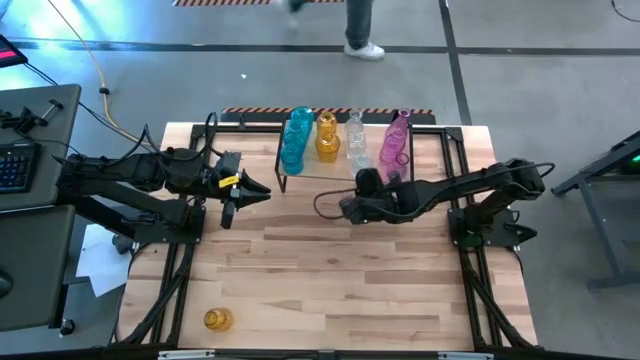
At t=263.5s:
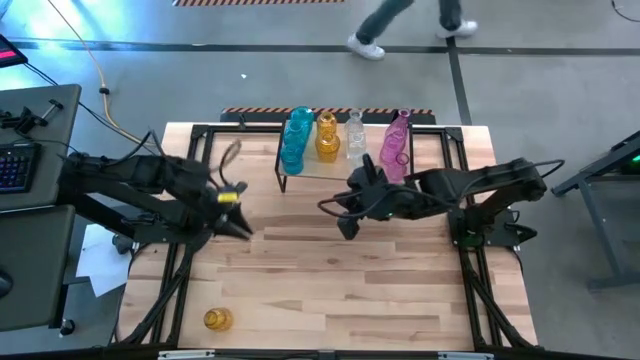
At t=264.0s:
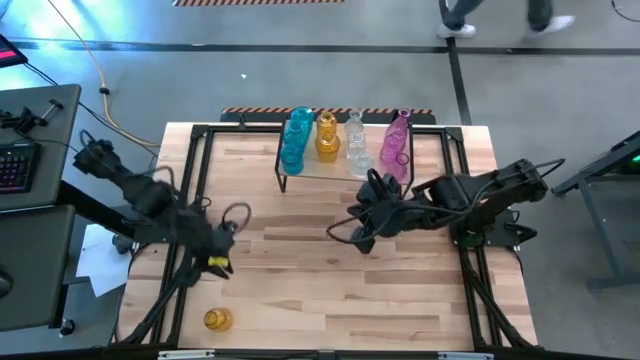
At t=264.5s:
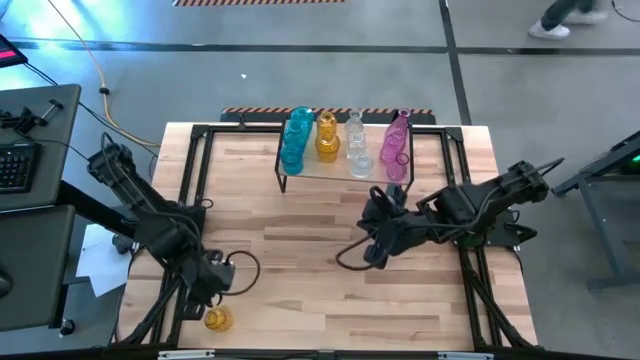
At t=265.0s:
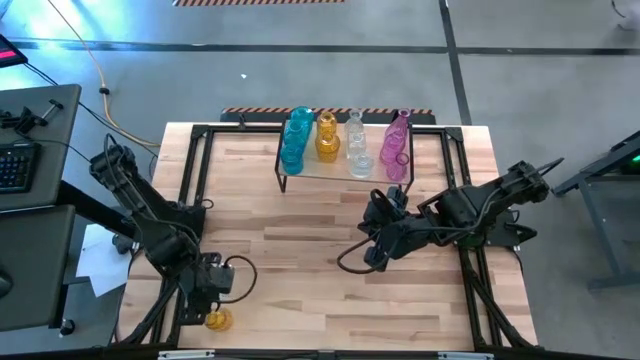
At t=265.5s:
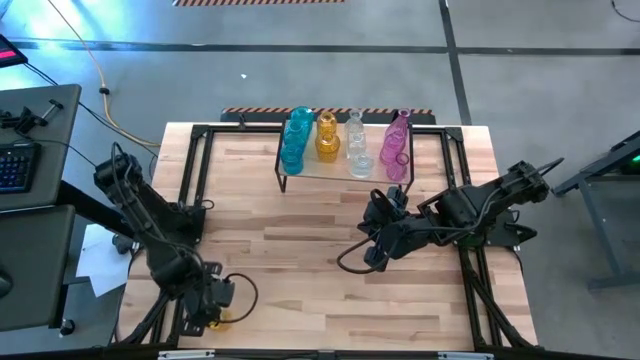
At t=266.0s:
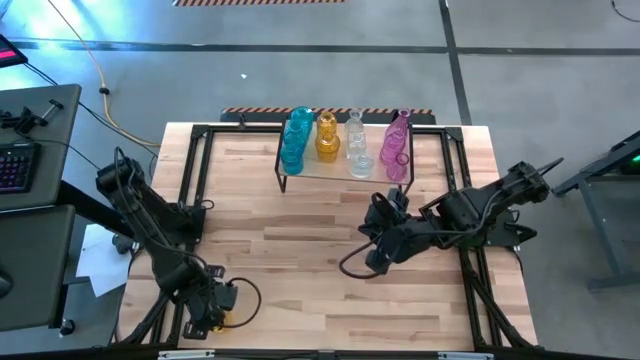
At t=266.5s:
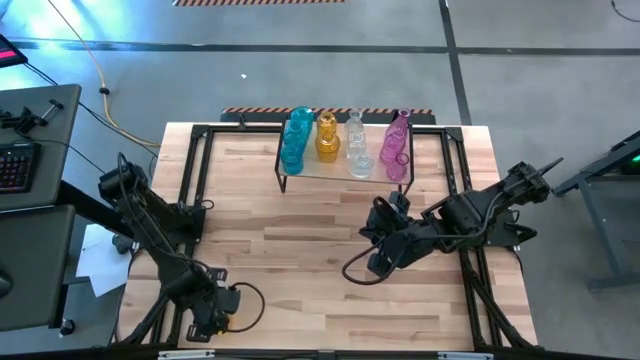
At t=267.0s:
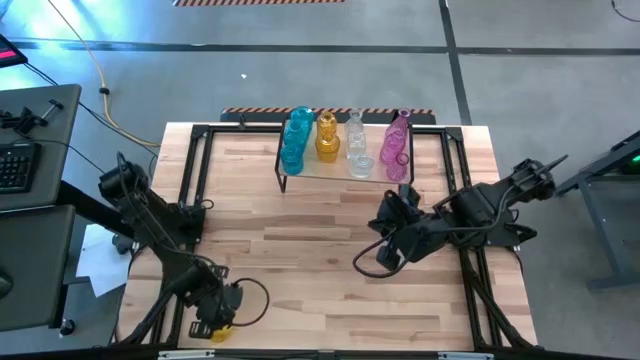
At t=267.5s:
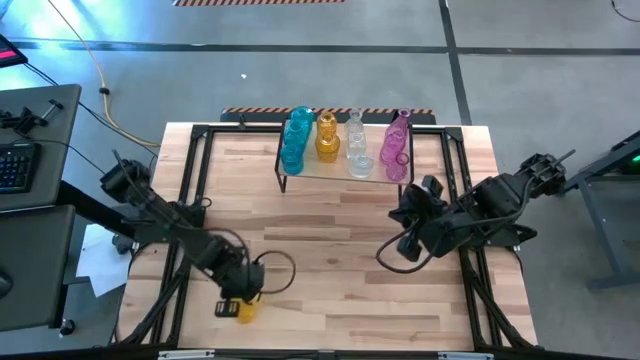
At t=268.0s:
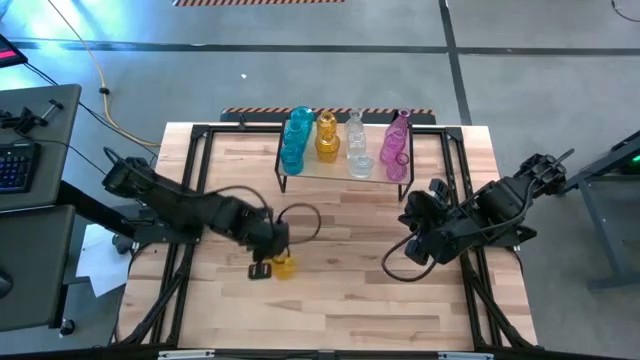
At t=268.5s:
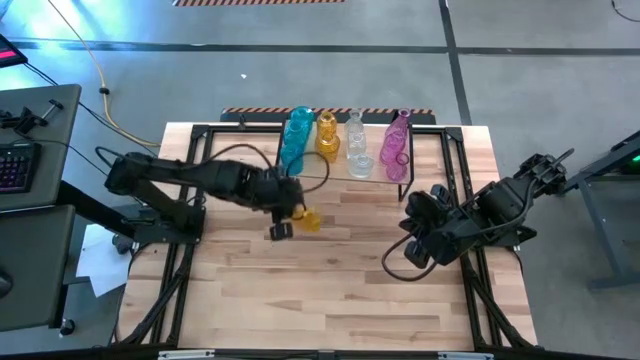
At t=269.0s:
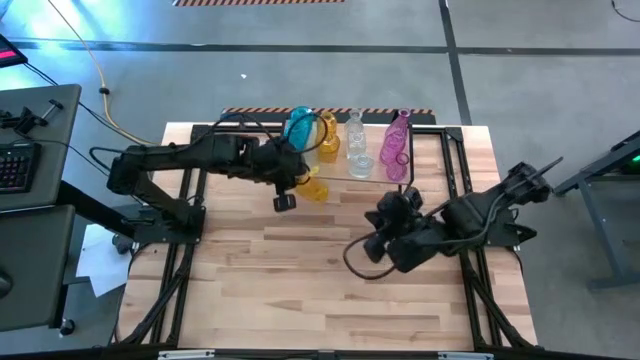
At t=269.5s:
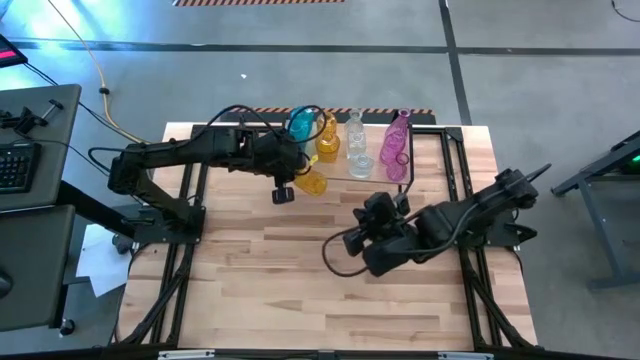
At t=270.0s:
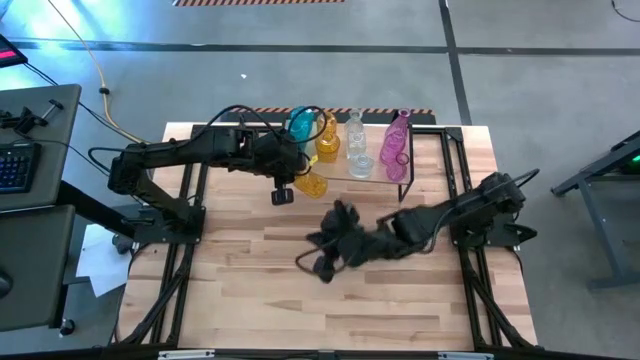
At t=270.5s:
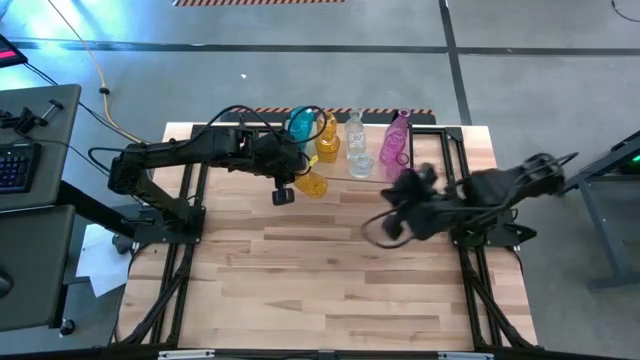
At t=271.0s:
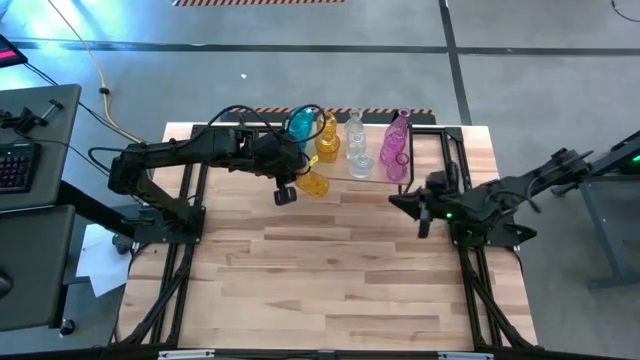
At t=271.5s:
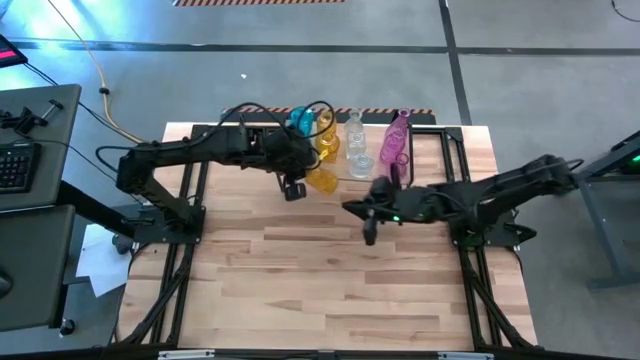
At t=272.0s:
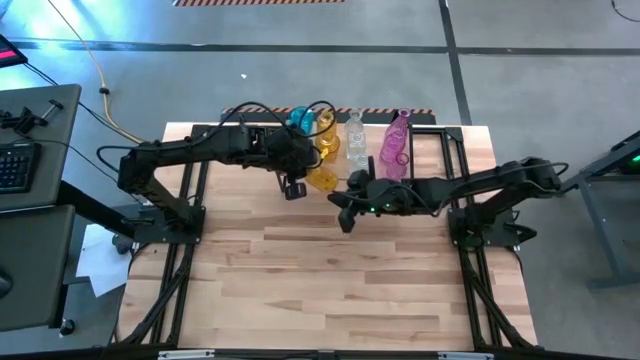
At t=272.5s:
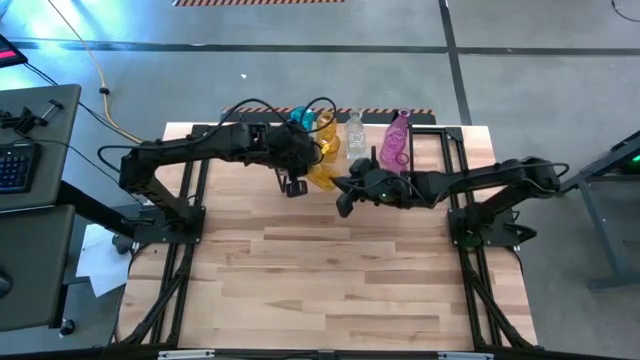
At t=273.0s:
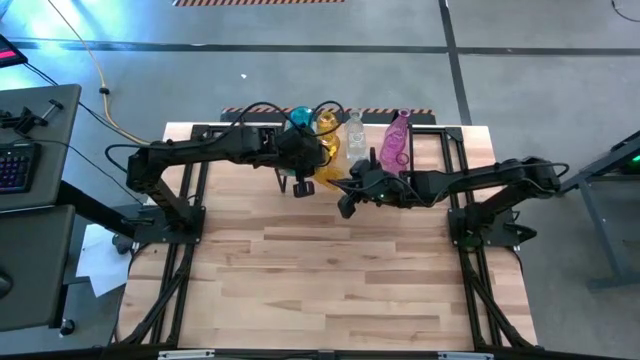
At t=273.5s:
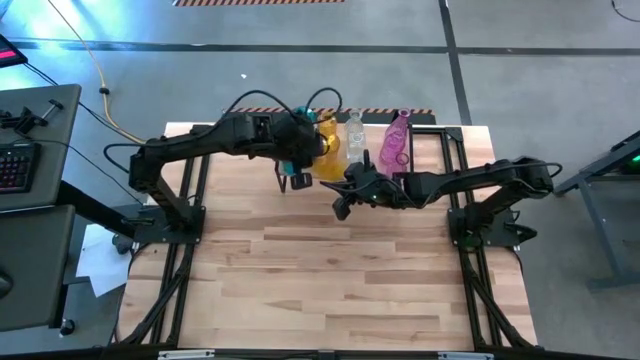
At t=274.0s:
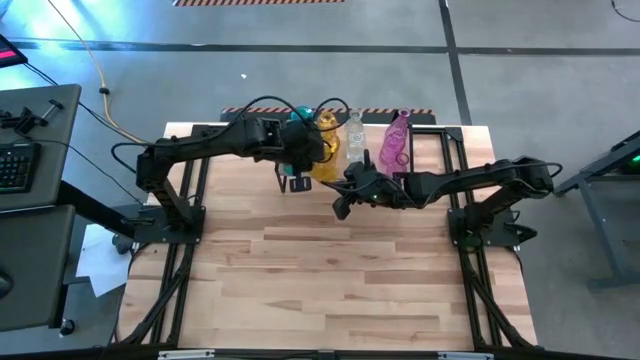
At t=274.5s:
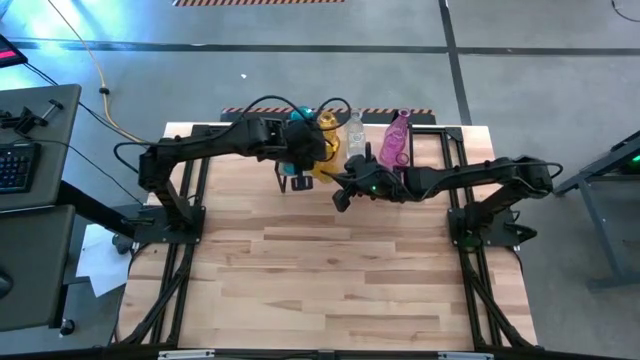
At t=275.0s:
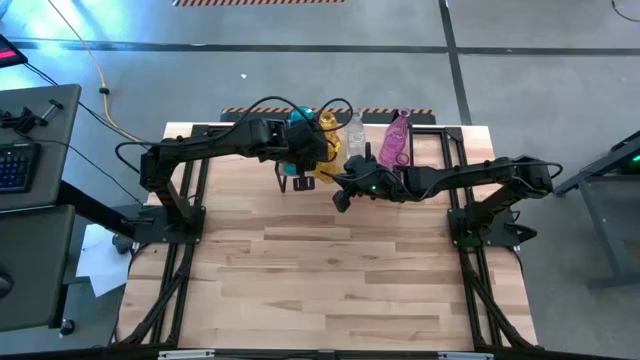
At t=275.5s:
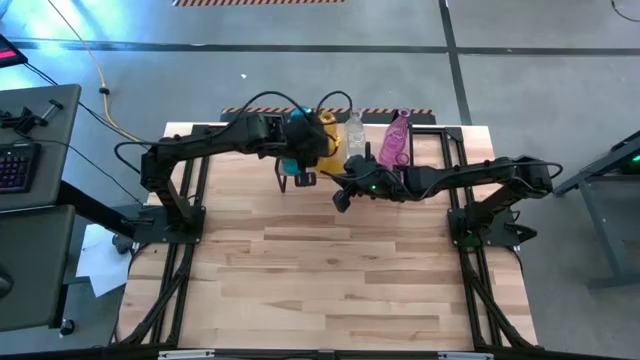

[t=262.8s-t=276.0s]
Task: sort vases onto shelf
Put the yellow transparent vase on the shelf aligned with the other yellow vases

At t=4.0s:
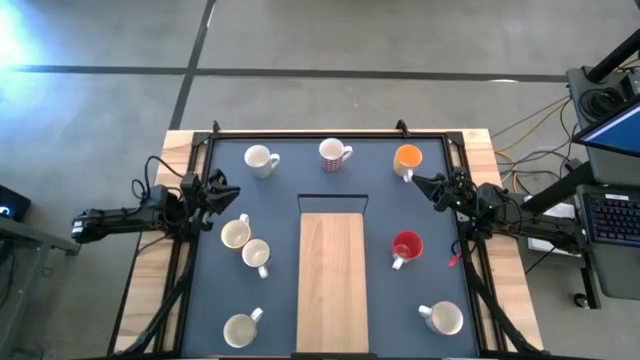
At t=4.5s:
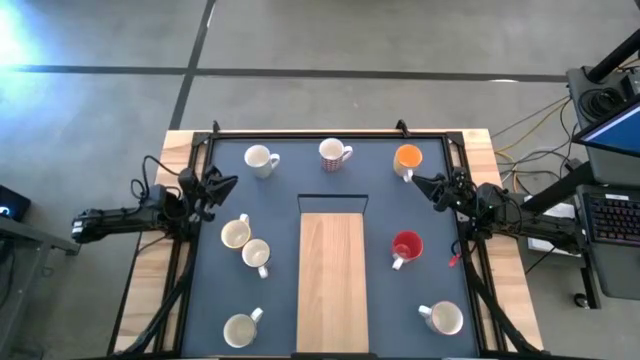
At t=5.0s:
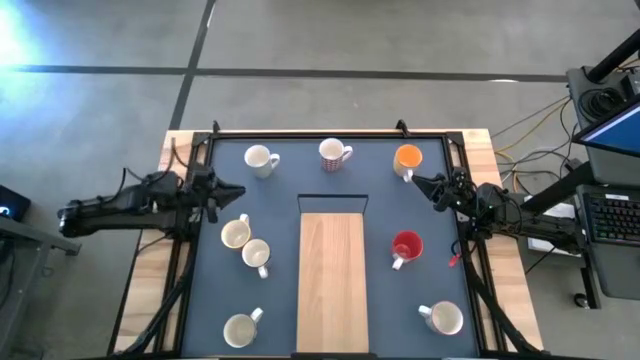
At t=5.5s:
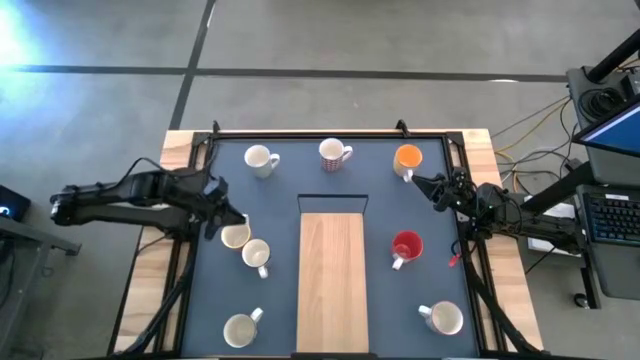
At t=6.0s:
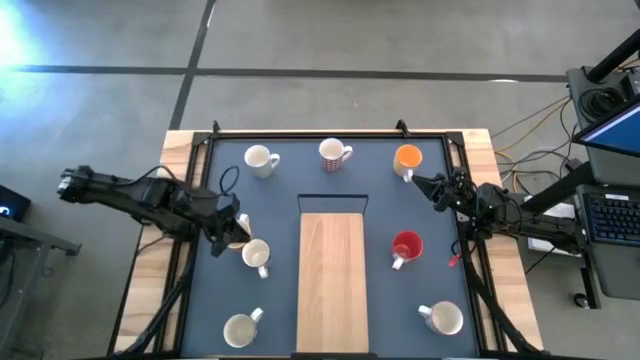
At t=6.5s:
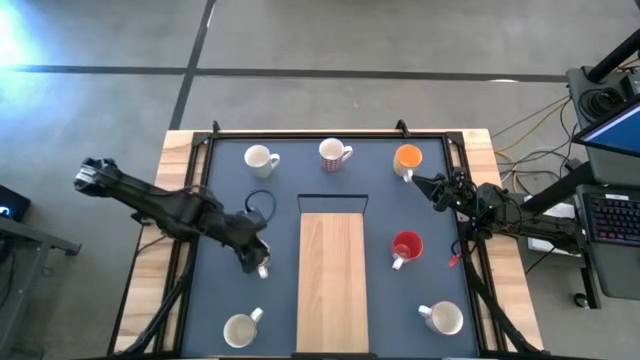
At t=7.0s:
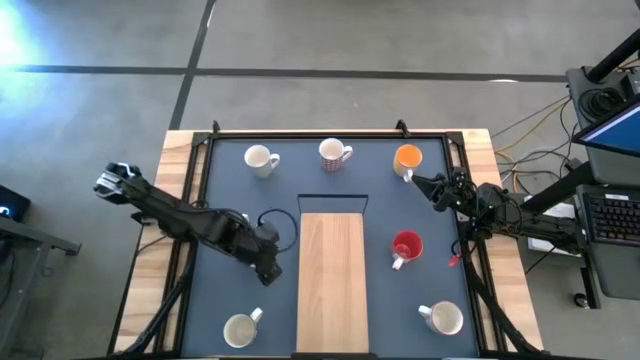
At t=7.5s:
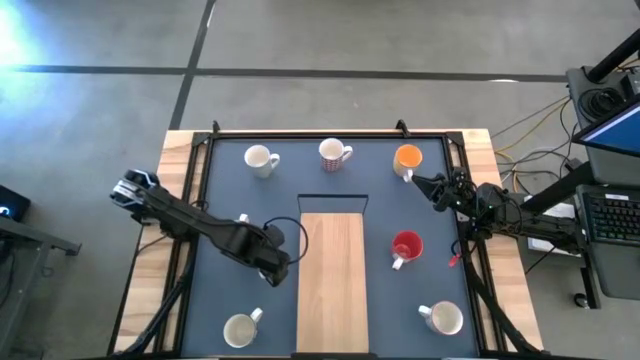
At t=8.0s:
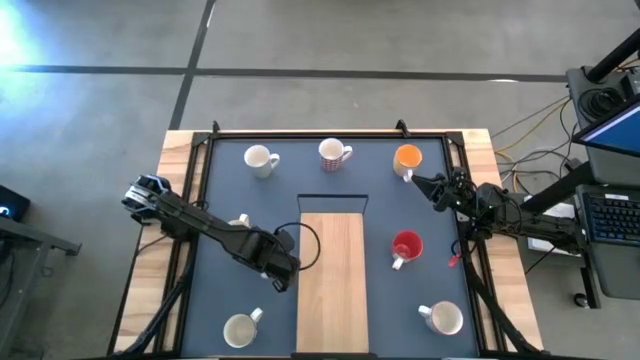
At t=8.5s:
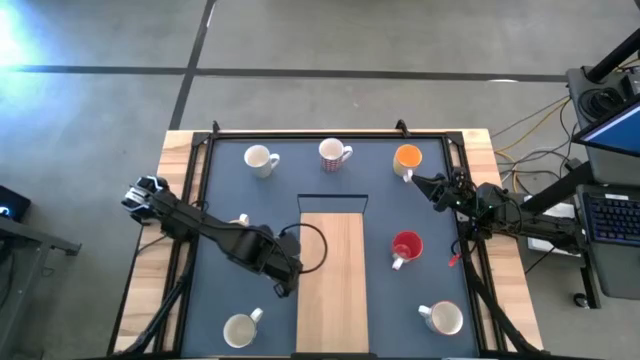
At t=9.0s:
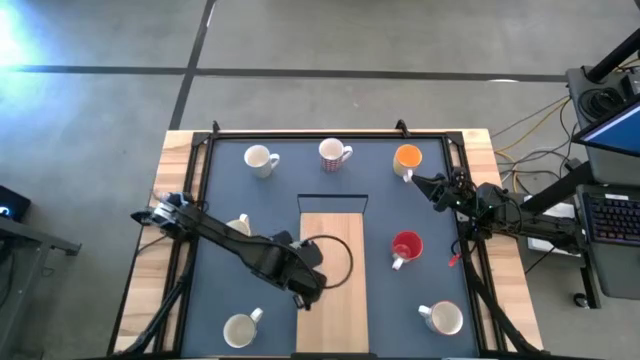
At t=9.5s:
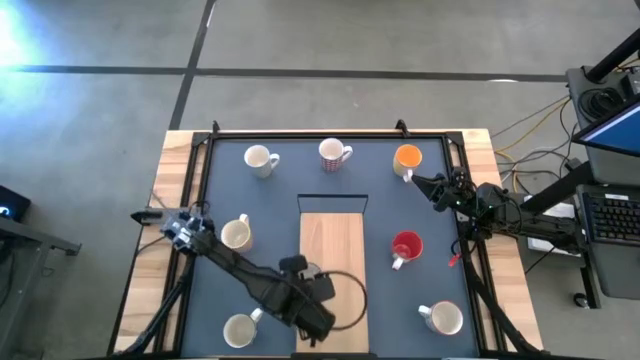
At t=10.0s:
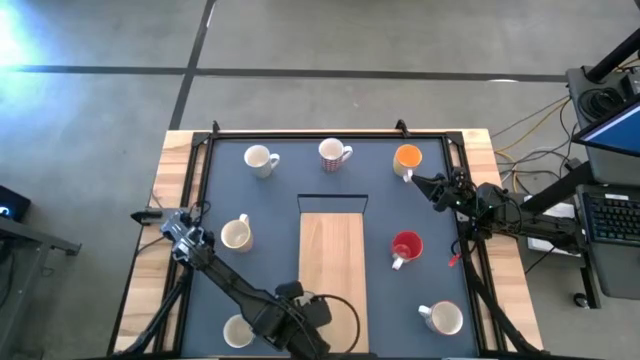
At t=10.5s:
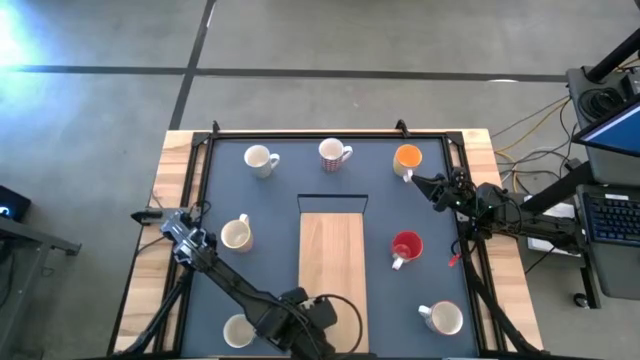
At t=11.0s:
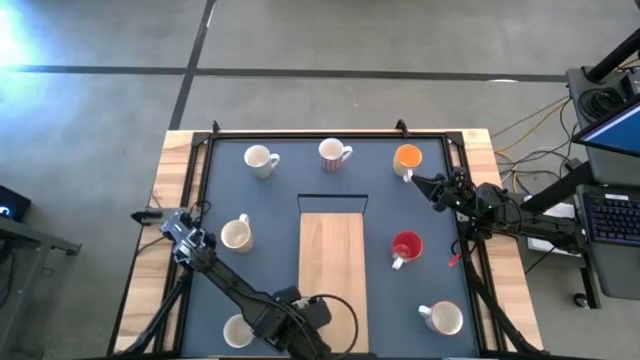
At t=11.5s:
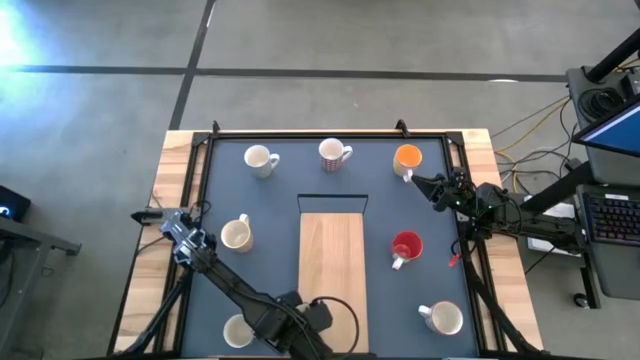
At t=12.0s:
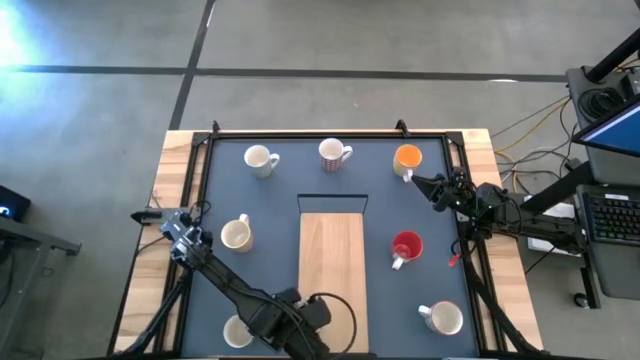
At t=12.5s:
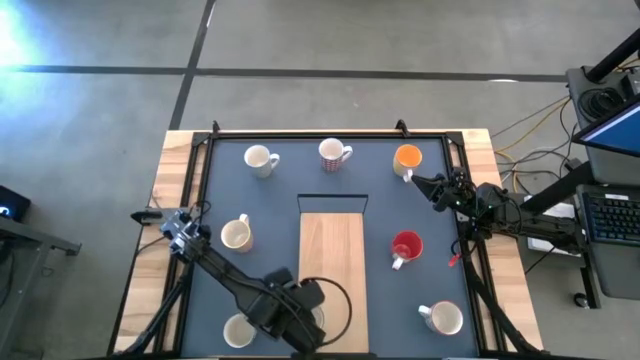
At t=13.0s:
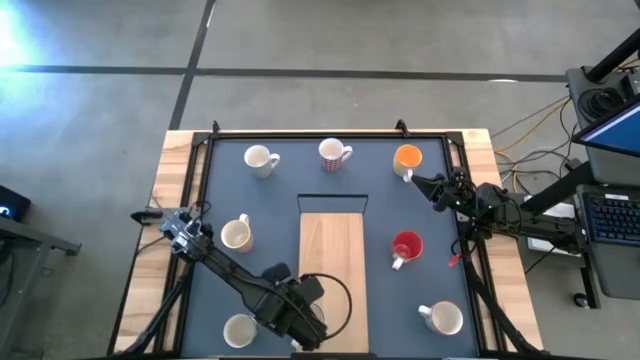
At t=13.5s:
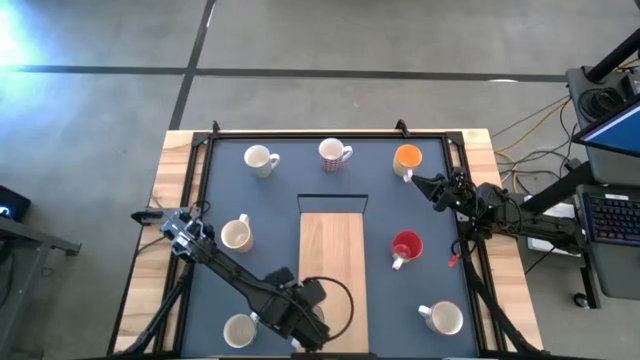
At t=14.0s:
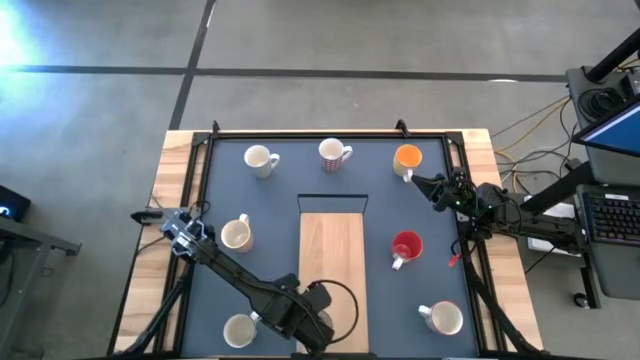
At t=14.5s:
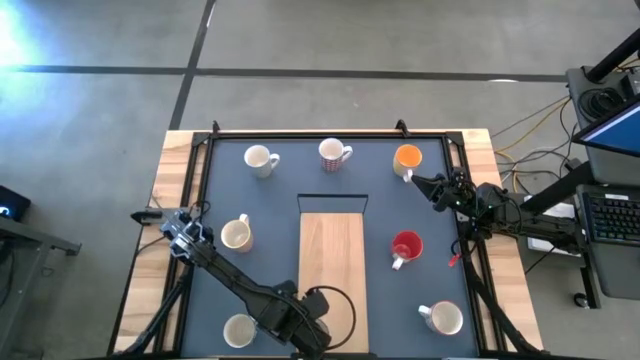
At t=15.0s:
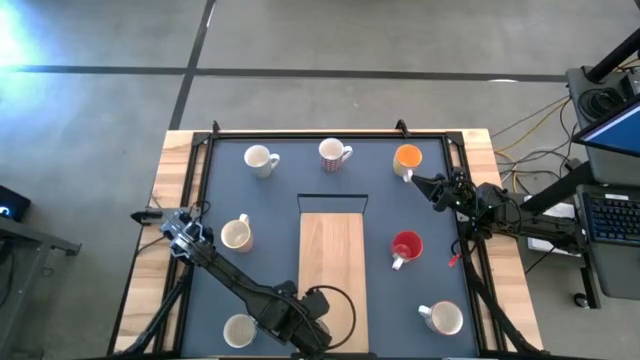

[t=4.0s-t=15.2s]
Task: Place coffee mugs
Put the top blue mug on the shelf
